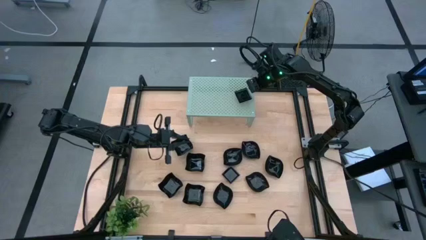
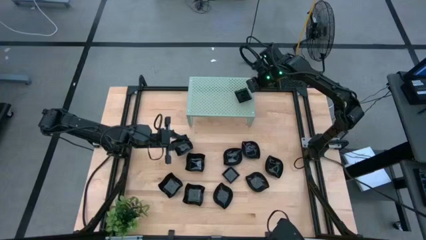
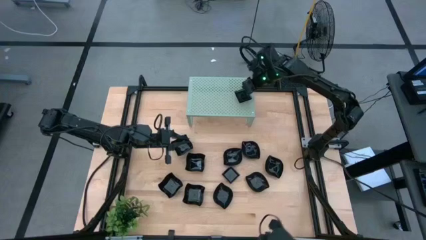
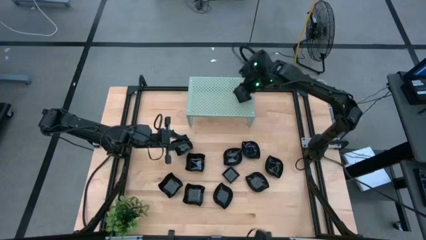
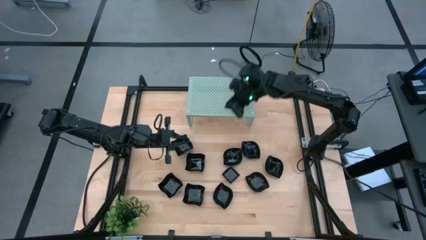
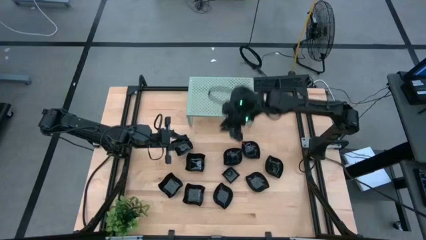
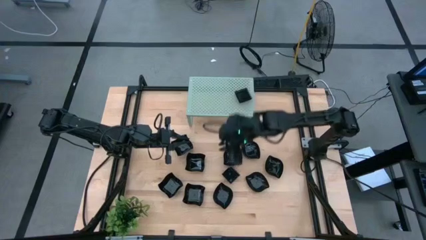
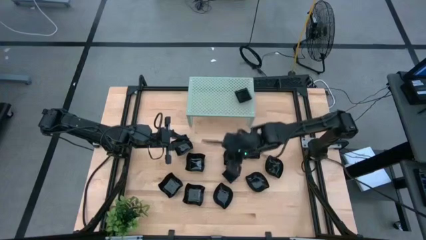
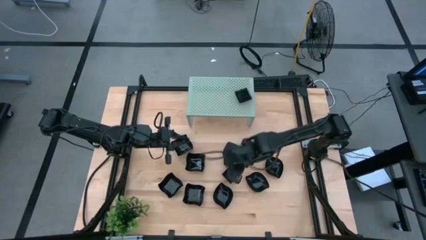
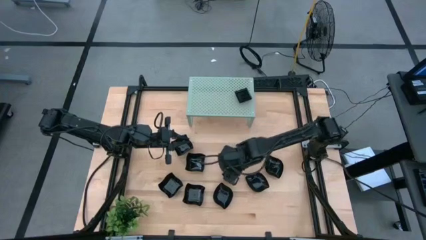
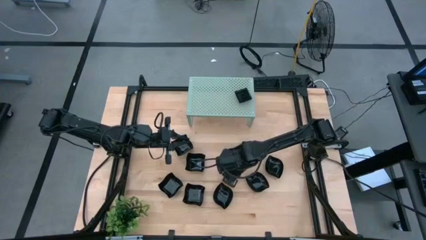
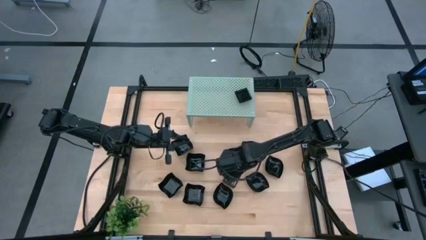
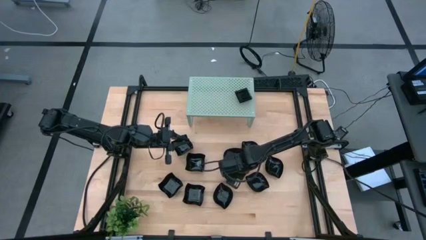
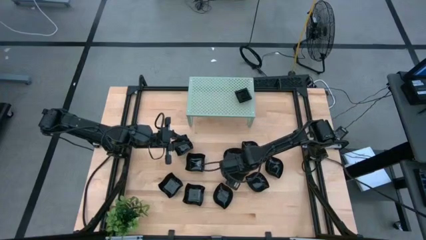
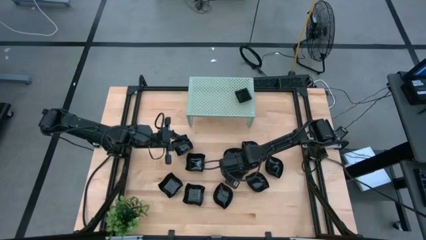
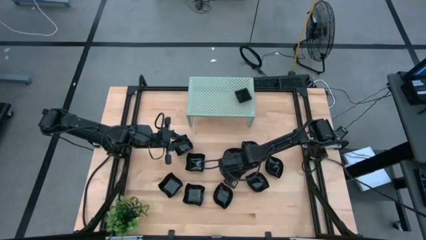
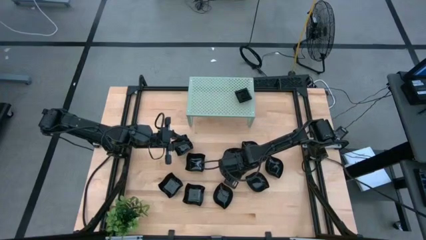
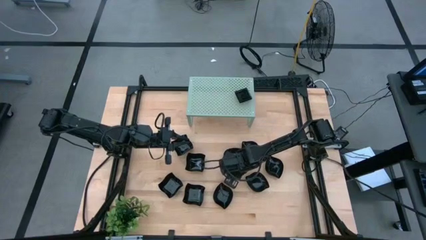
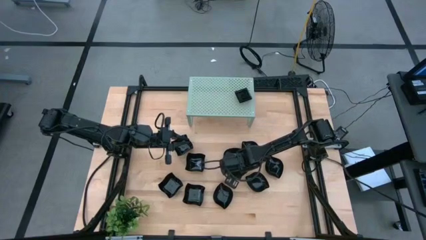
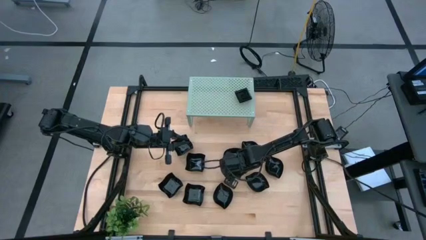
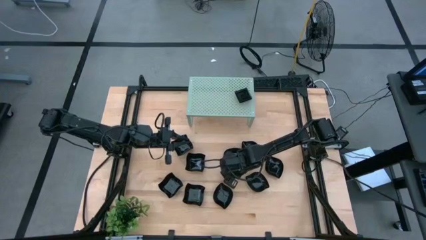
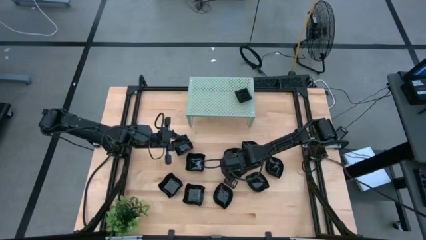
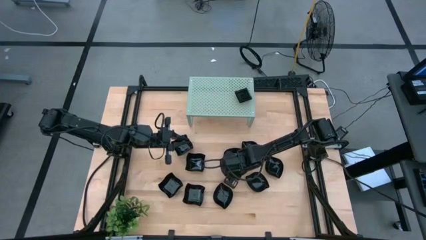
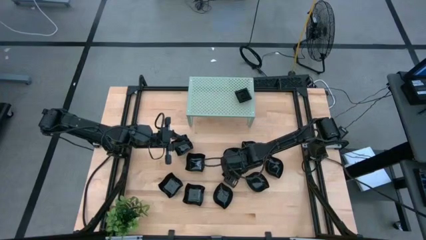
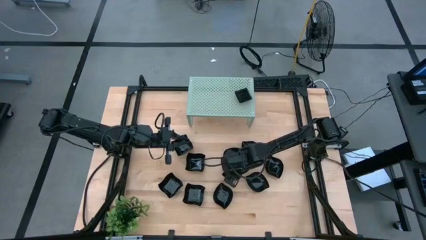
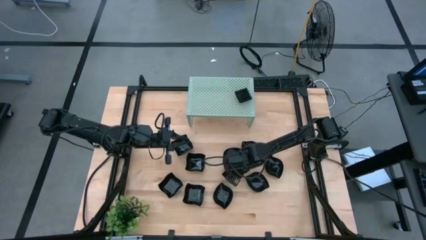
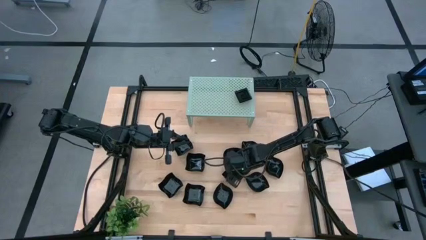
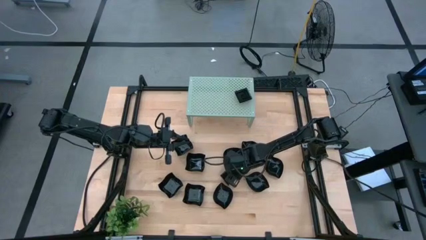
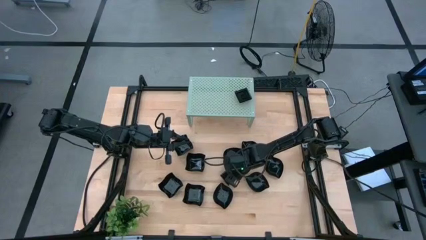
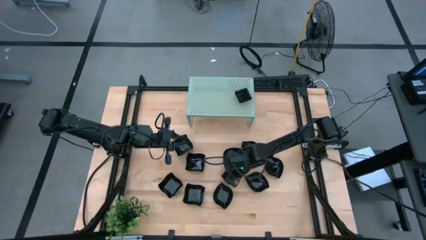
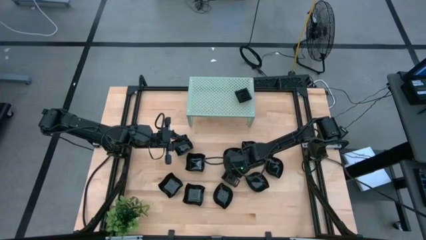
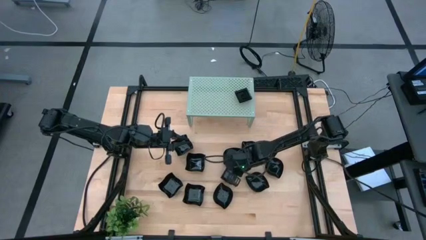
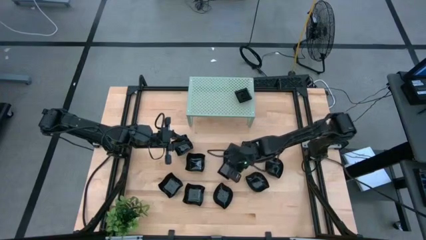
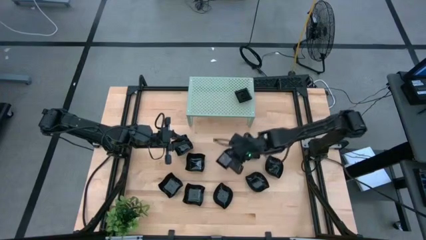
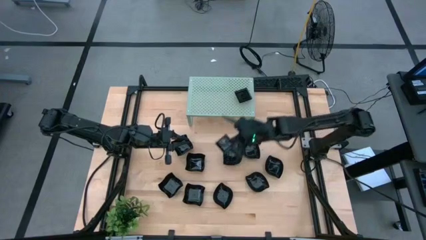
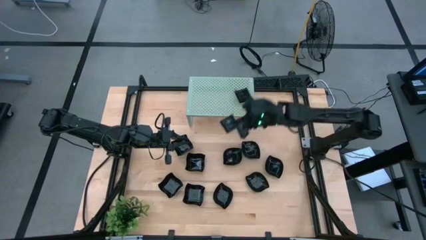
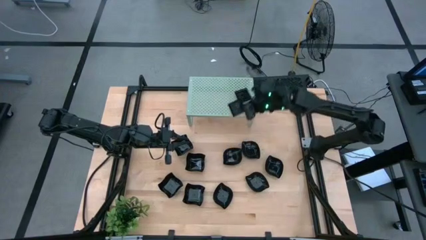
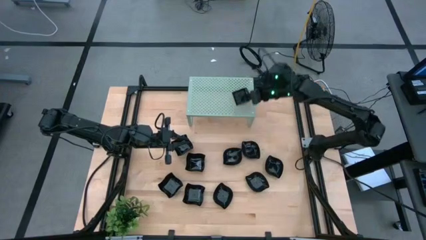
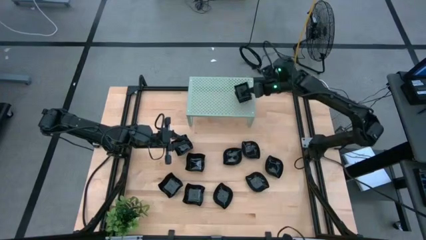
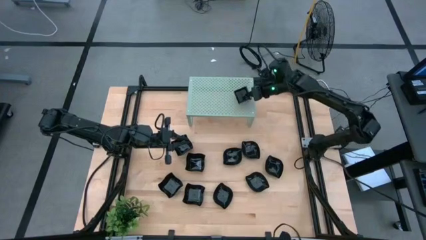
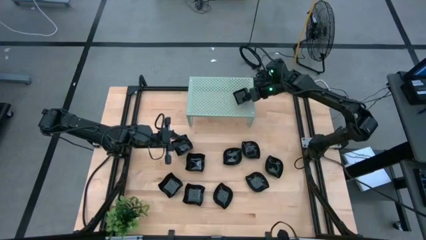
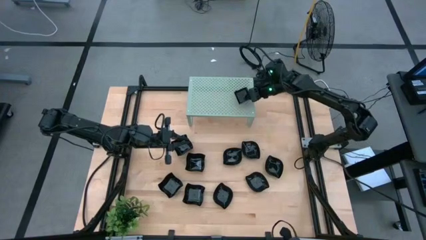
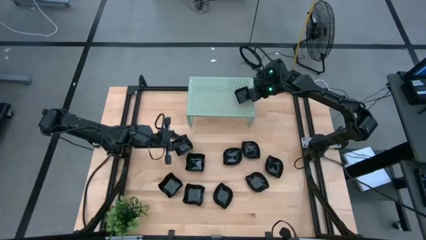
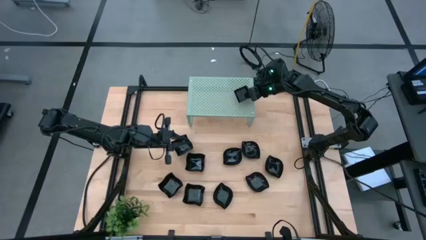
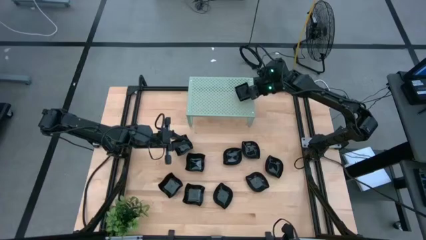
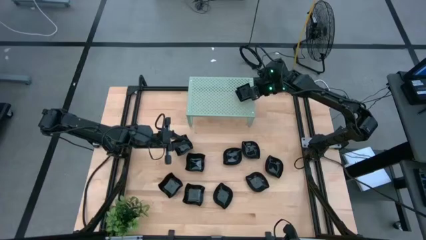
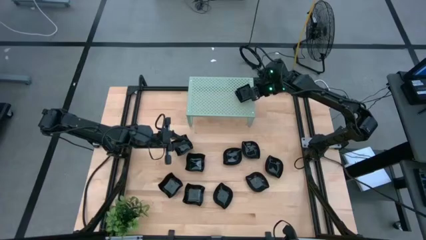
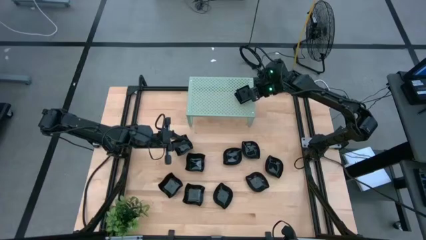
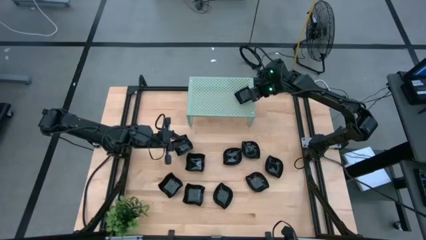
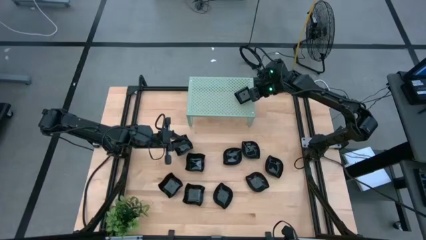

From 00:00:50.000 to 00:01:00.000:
Task: Pick & Place Mini shaped plates
Stack the black square plate on top of the other black square plates on the shelf

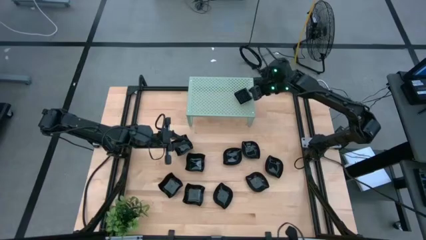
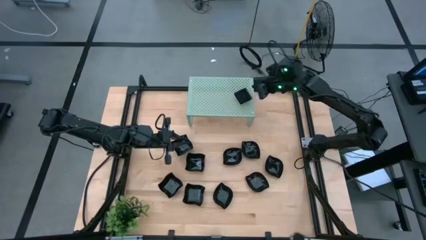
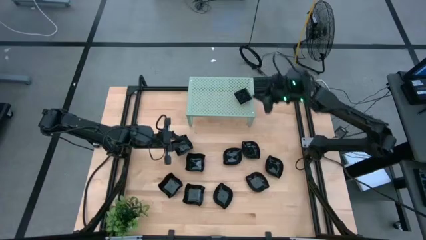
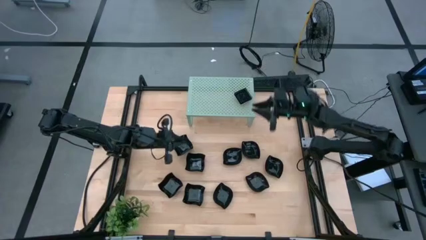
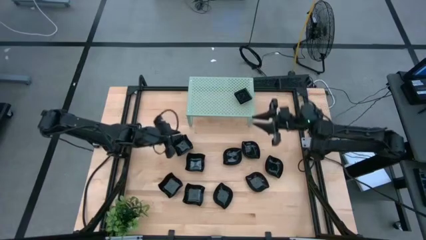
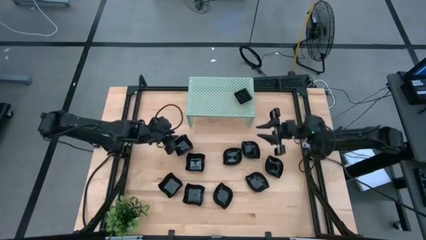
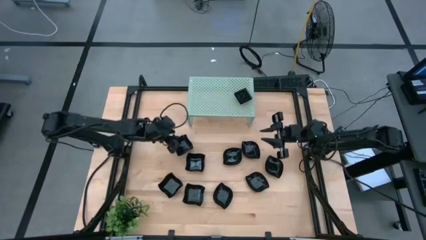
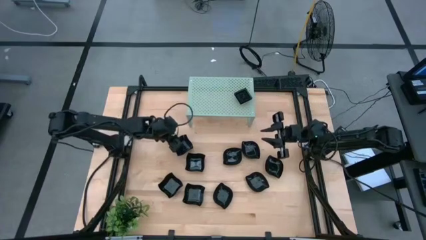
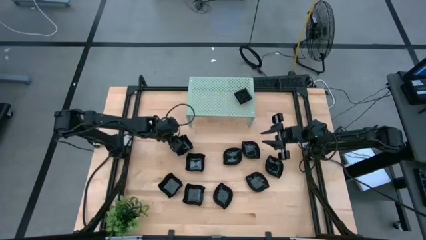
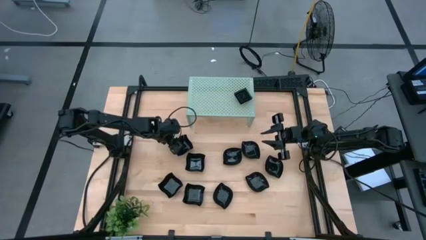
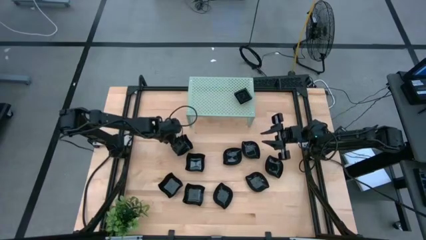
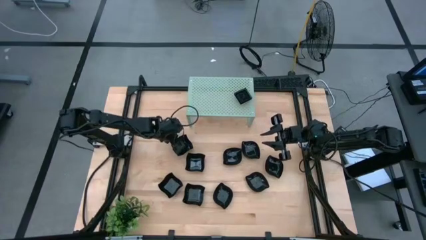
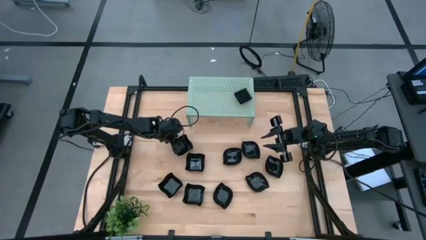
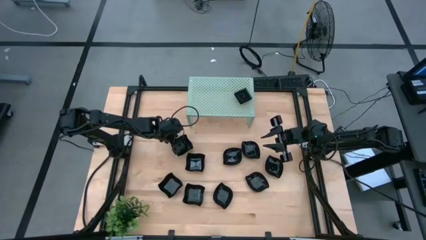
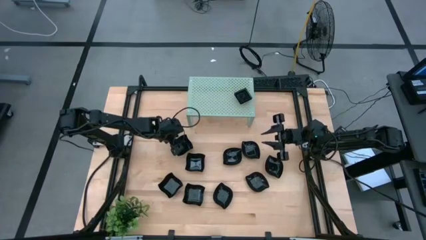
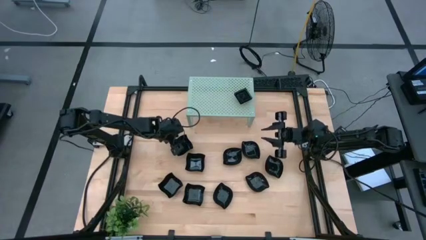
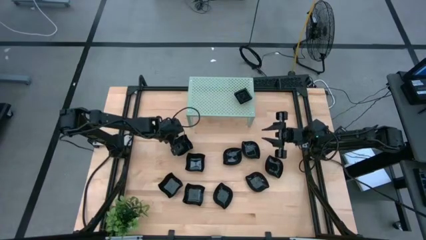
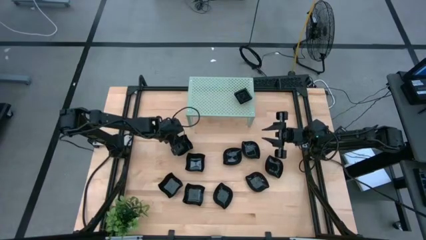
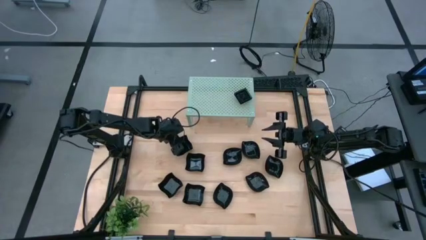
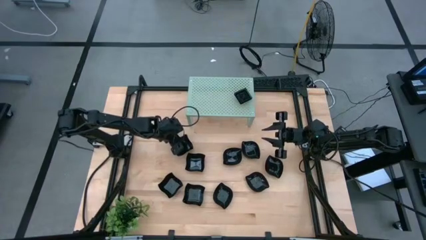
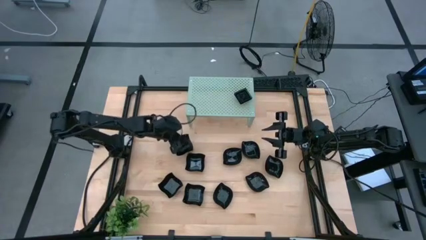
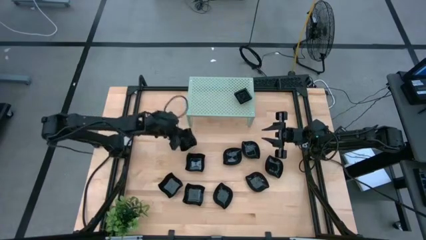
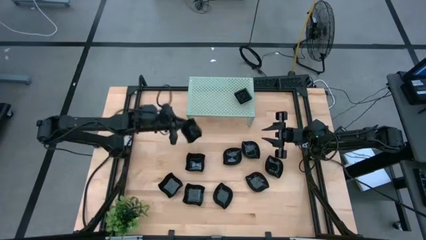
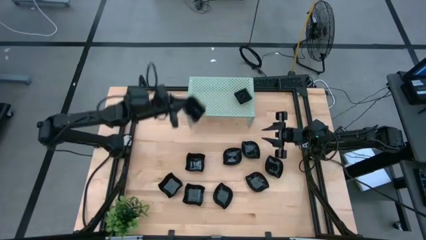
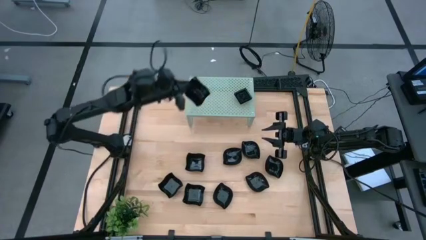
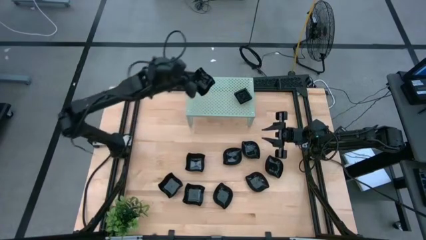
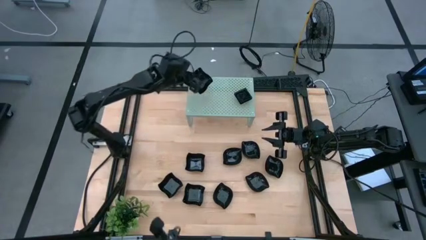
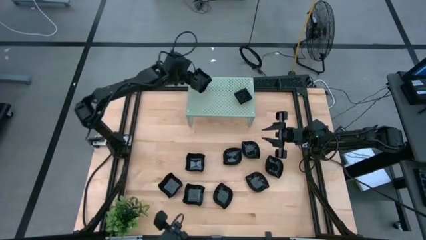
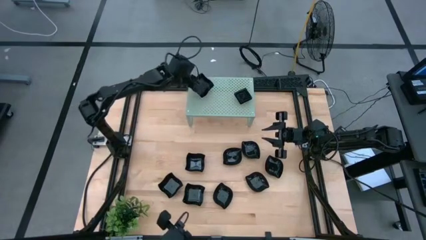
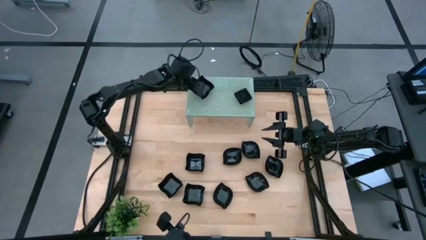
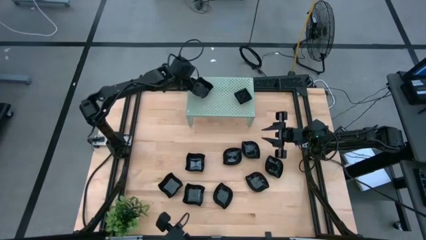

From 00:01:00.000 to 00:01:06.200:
Put the black distorted square plate on the shelf
